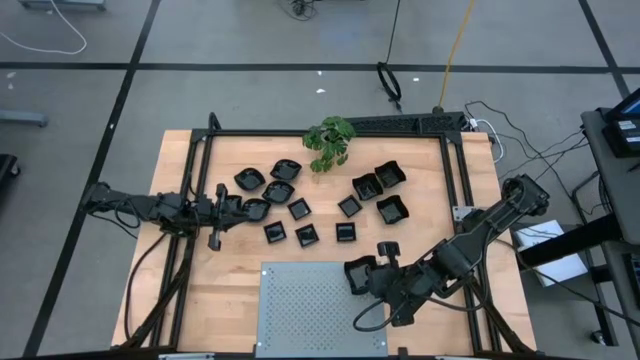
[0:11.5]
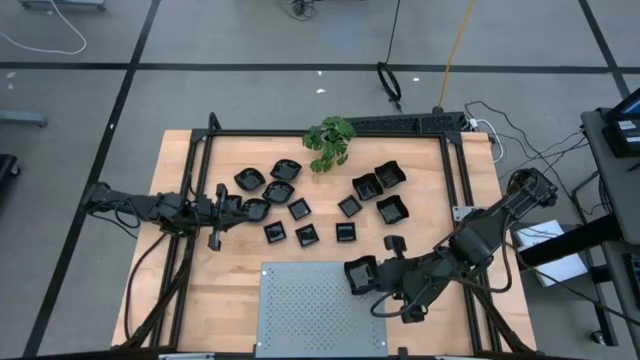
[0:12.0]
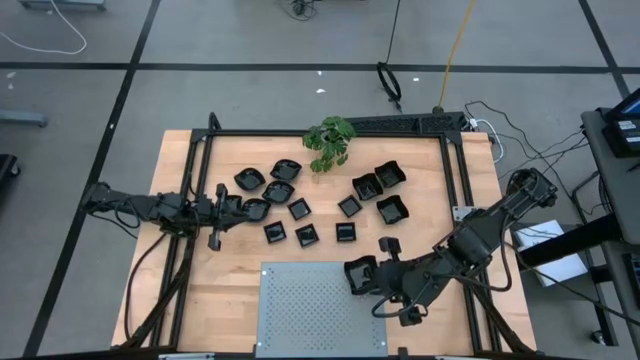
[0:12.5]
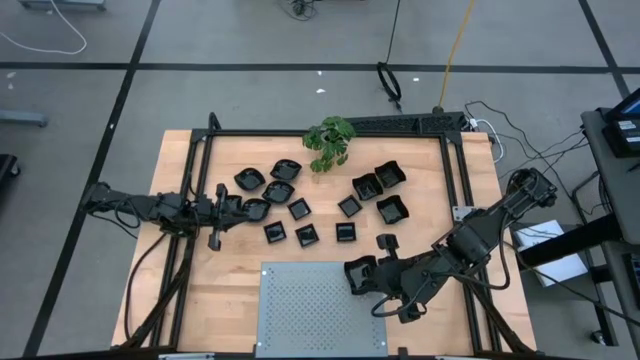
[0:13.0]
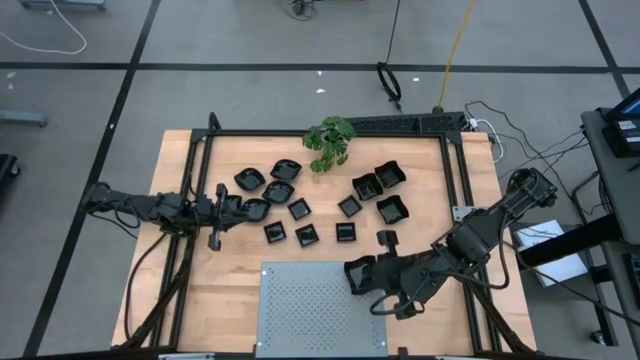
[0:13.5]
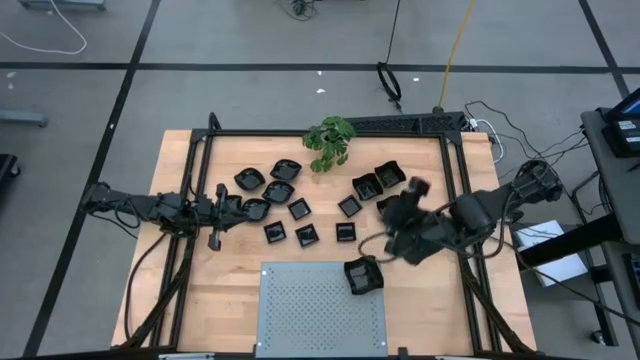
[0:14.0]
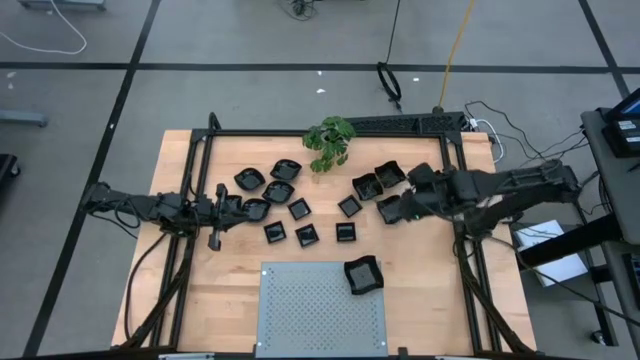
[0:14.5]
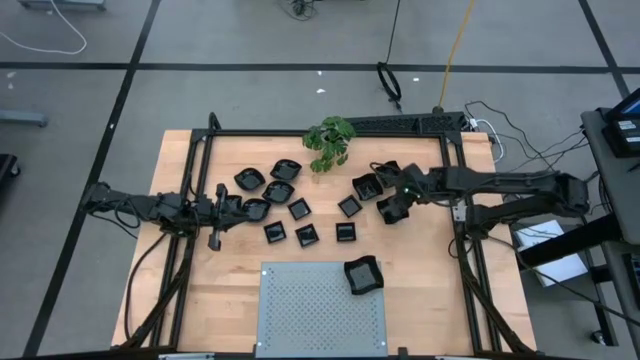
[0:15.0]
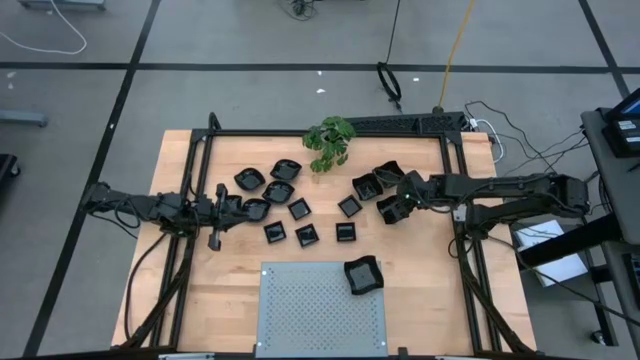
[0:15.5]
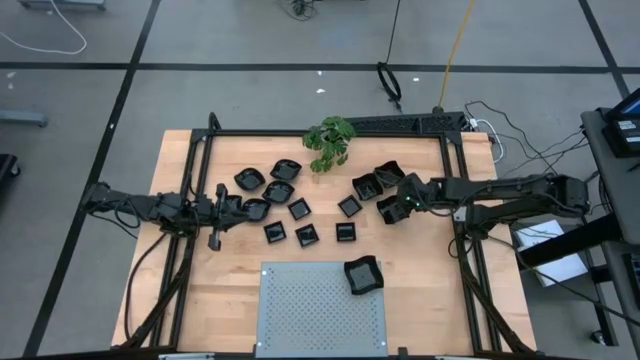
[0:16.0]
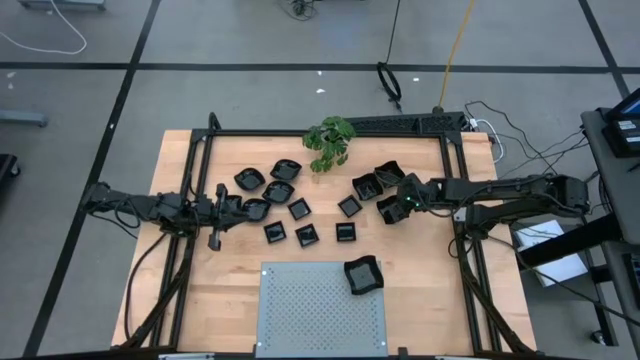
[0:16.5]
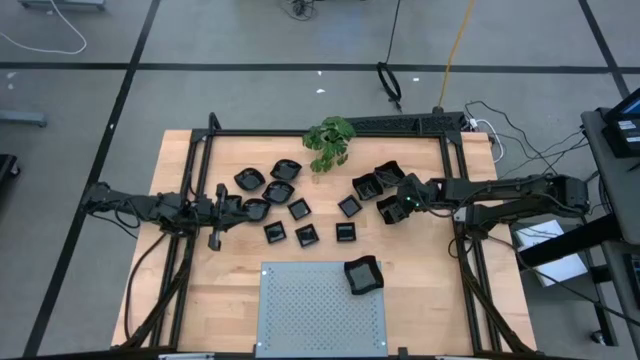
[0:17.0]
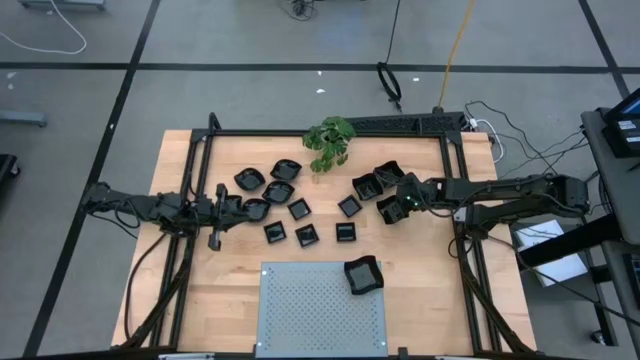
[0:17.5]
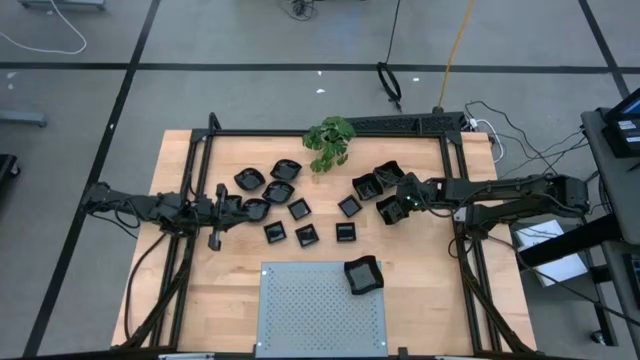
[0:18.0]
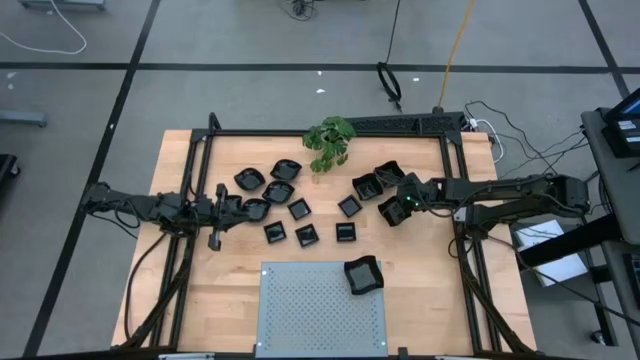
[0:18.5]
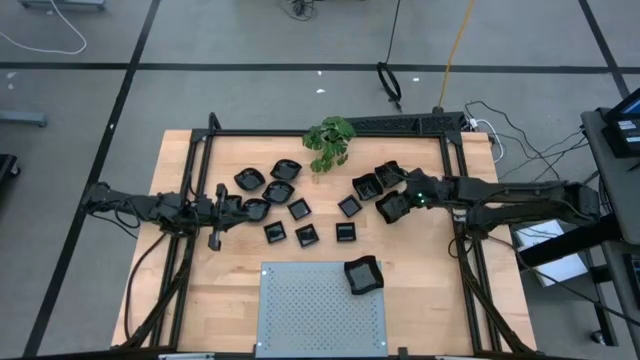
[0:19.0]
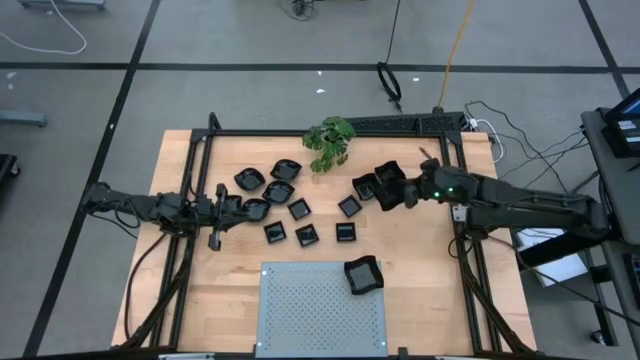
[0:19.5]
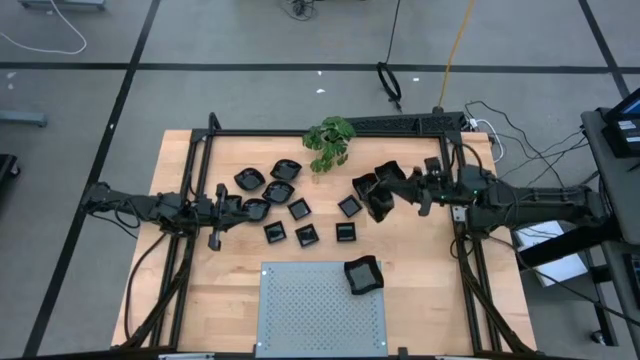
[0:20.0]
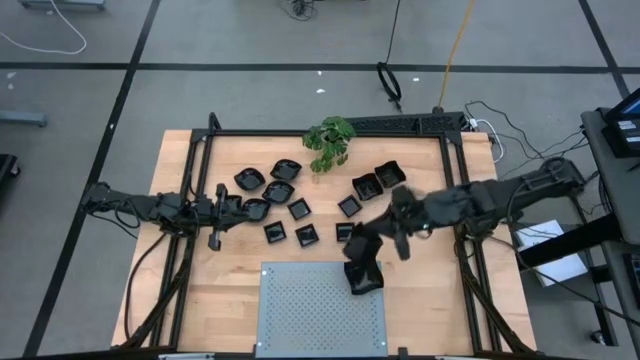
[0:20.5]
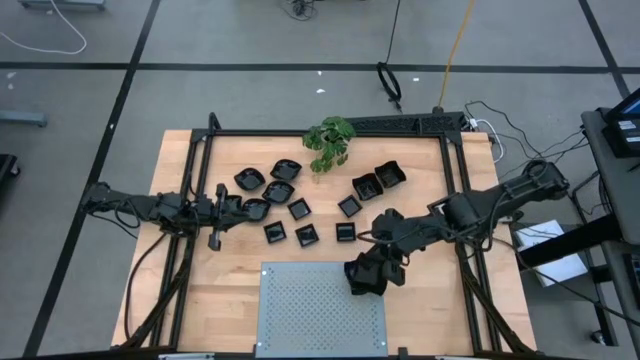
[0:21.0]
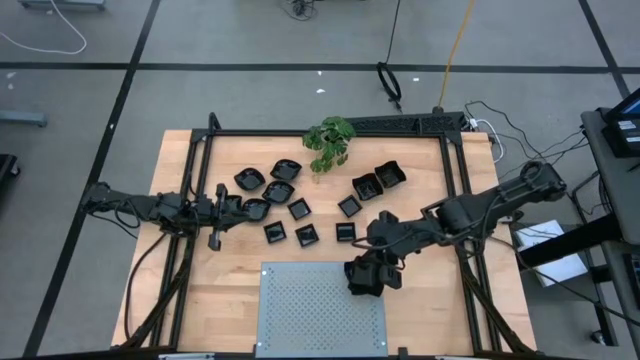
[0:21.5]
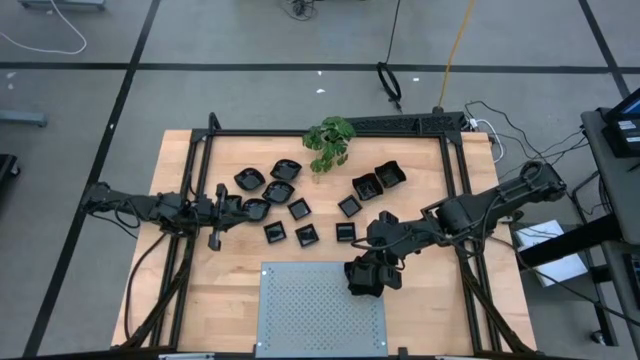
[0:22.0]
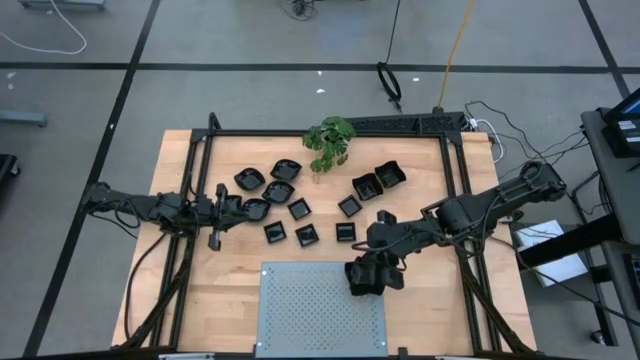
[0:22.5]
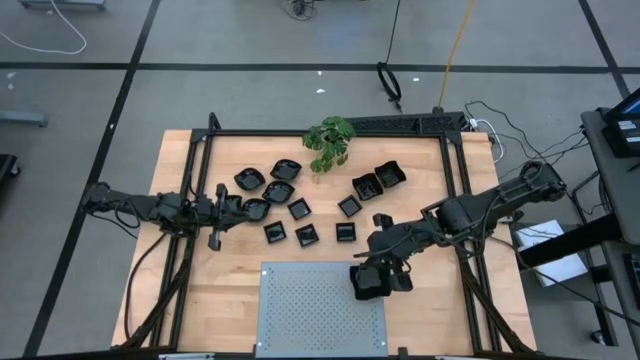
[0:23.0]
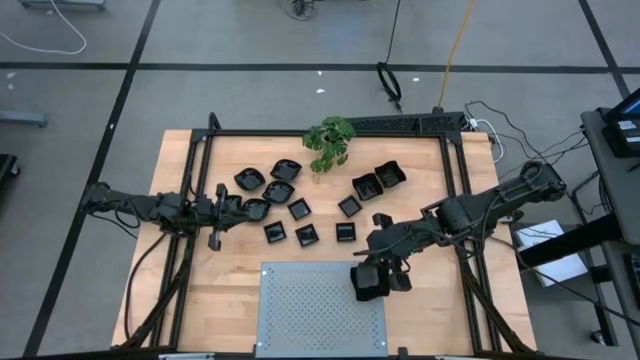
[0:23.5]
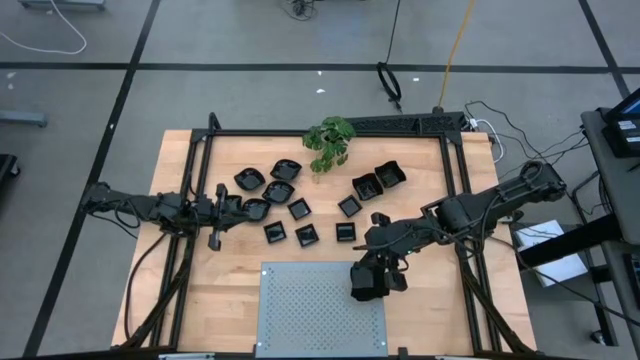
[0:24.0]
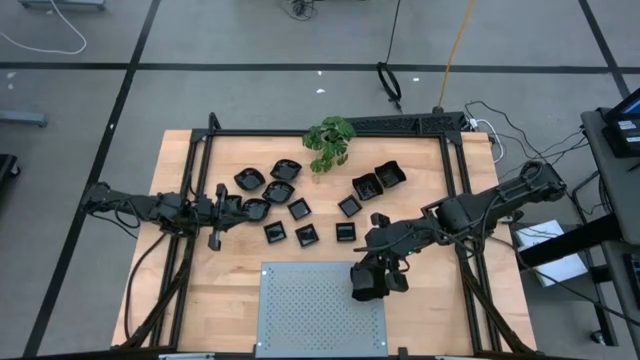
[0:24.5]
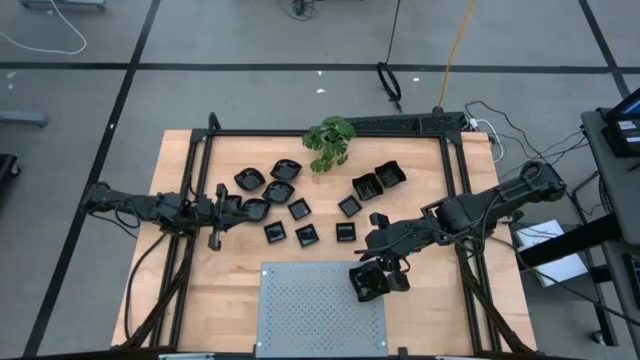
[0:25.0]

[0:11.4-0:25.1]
Task: Pick & Place Mini shaped plates
Stack the distorted square plate onto the other distorted square plate on the shelf

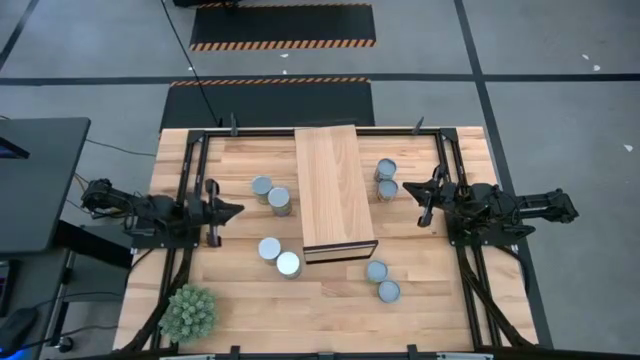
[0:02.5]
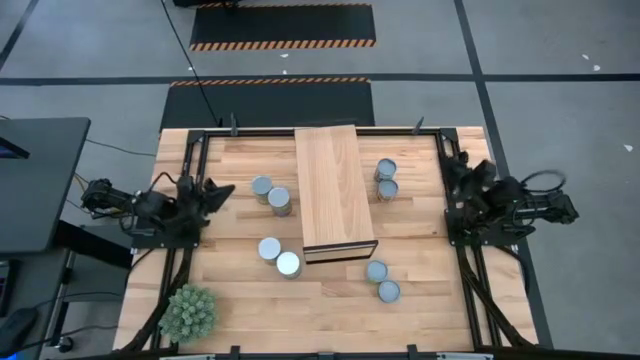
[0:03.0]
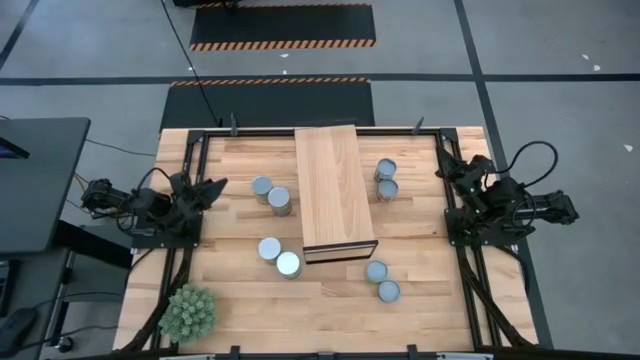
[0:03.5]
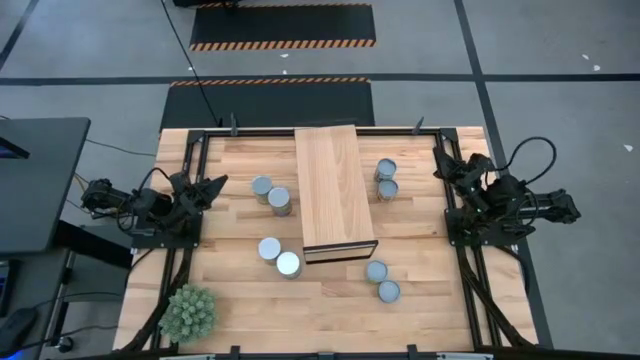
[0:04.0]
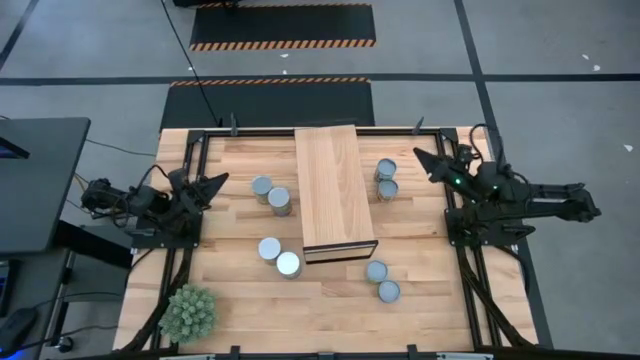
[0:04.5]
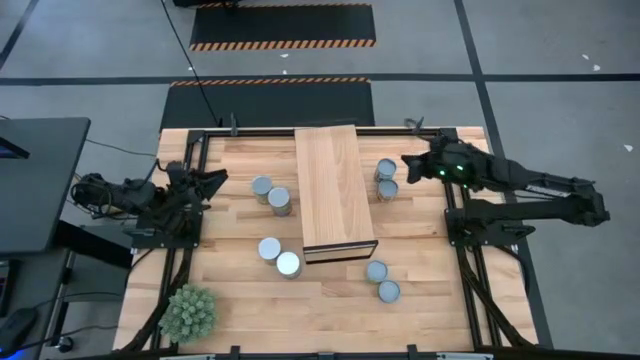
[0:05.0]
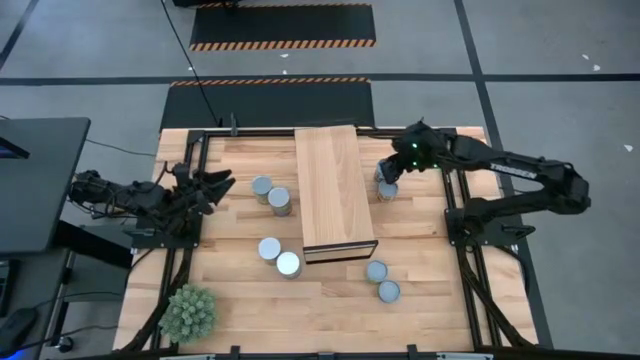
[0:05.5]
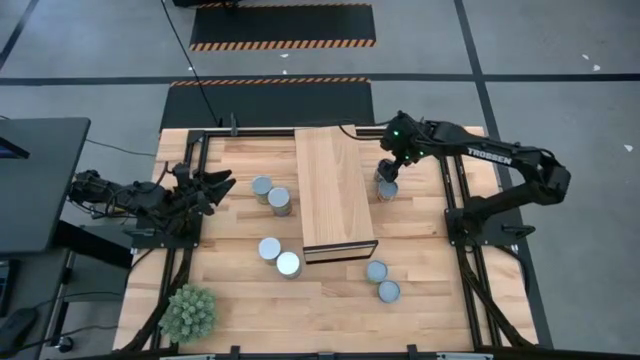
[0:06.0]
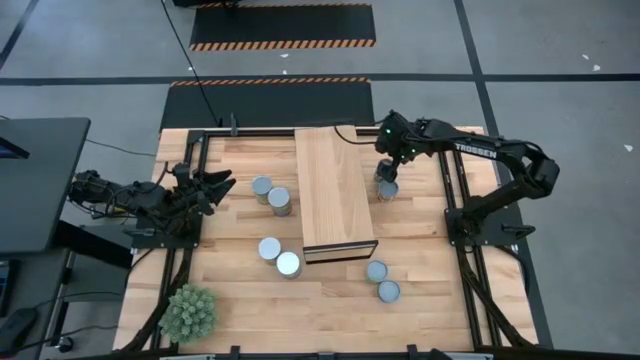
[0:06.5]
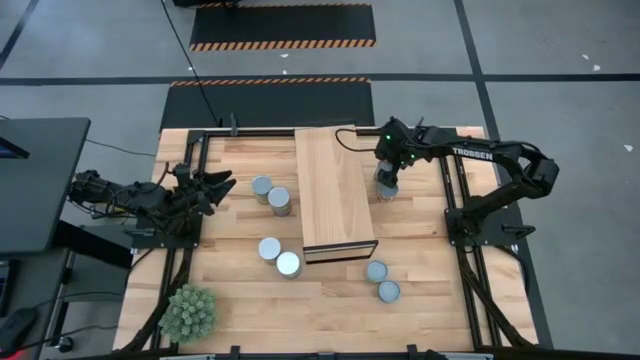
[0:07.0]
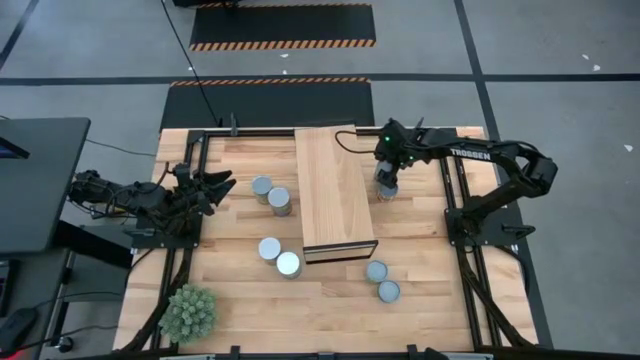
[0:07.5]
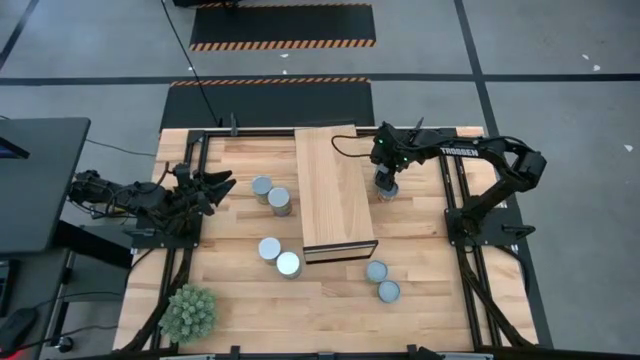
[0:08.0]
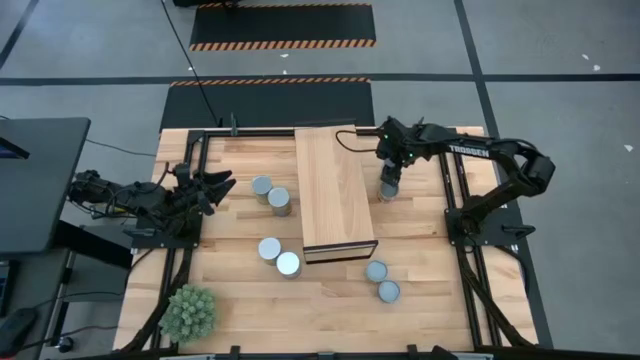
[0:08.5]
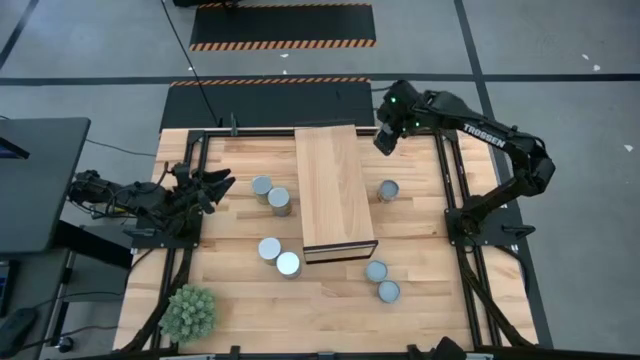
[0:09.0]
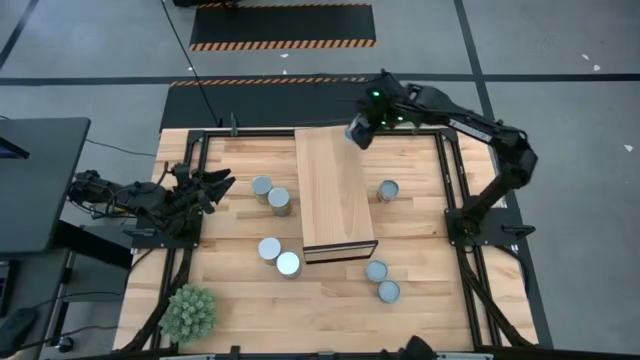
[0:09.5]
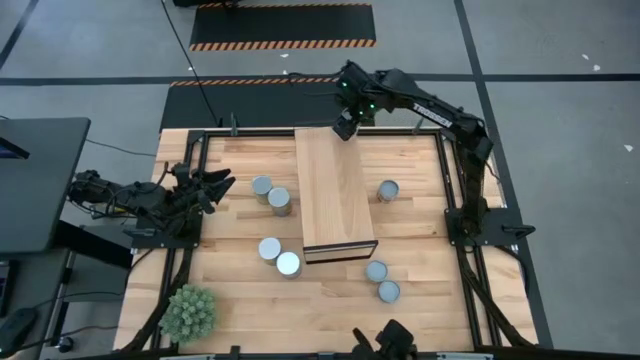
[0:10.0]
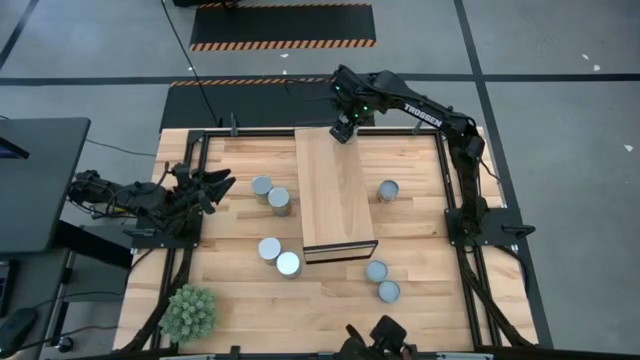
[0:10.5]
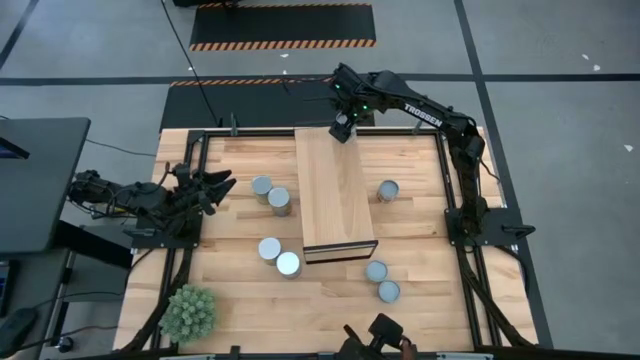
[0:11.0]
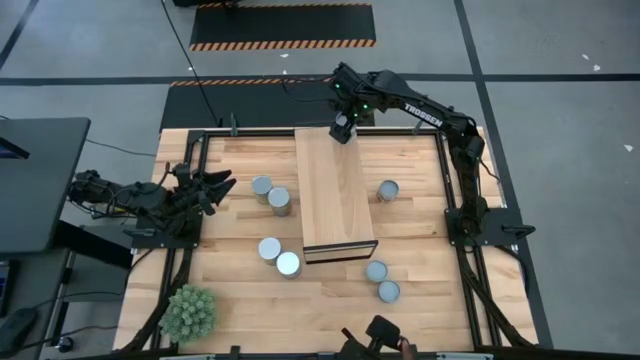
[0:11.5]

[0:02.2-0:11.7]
Task: Pick and place cans onto a shelf
Put the canned mixed vegetables on the shelf
